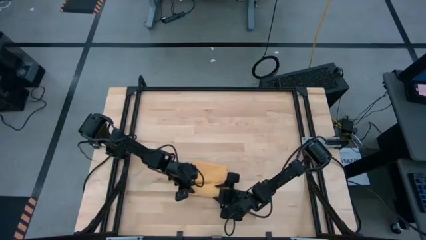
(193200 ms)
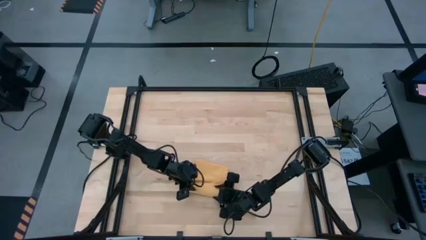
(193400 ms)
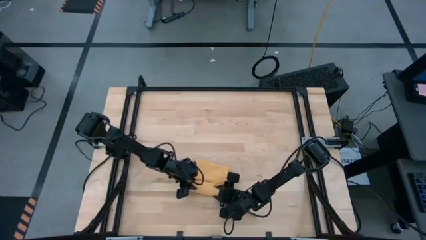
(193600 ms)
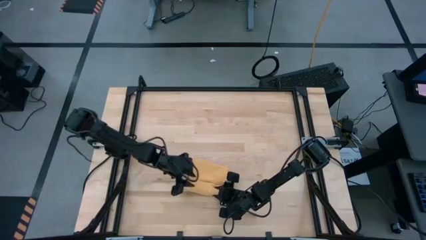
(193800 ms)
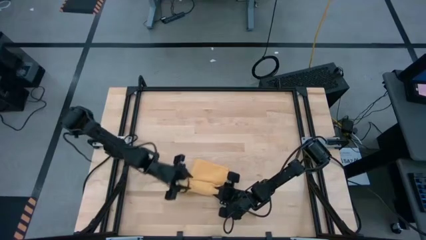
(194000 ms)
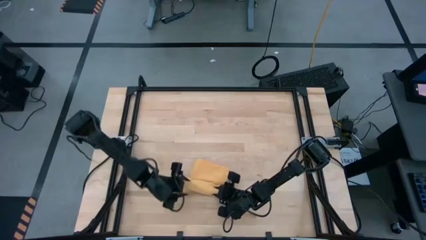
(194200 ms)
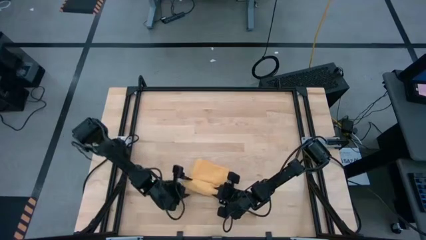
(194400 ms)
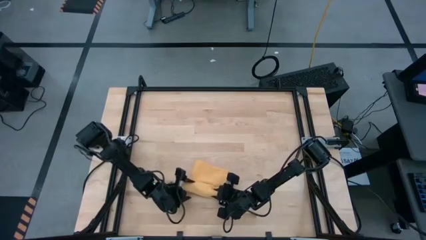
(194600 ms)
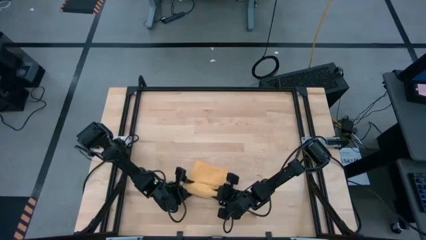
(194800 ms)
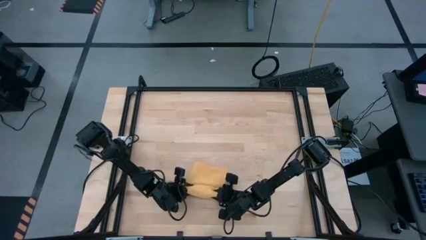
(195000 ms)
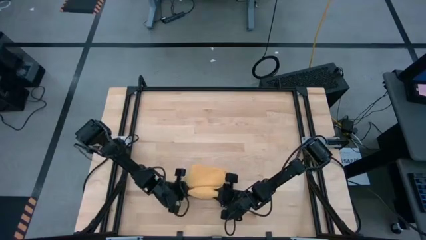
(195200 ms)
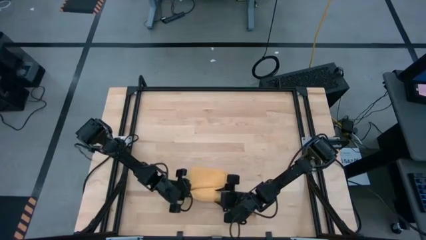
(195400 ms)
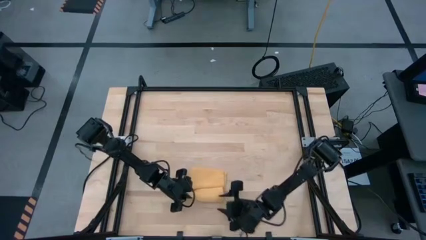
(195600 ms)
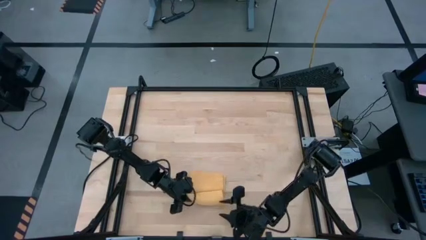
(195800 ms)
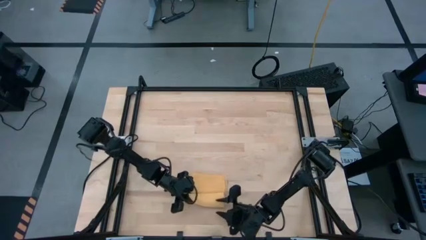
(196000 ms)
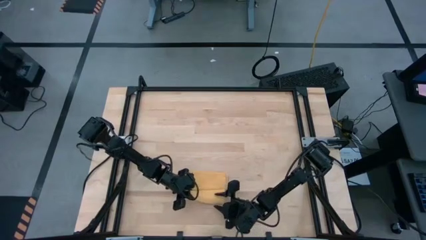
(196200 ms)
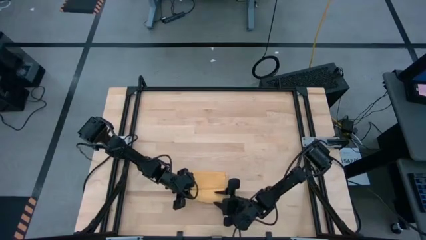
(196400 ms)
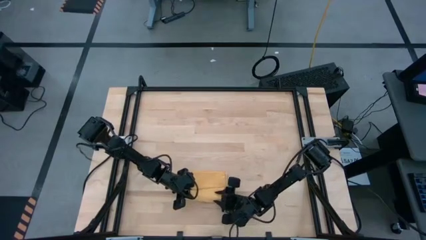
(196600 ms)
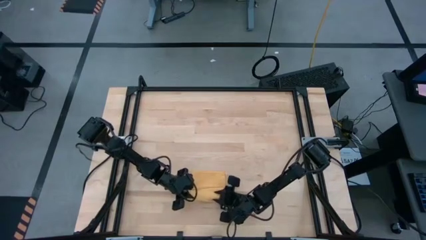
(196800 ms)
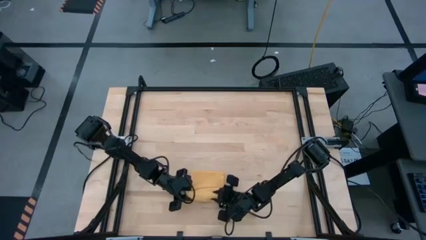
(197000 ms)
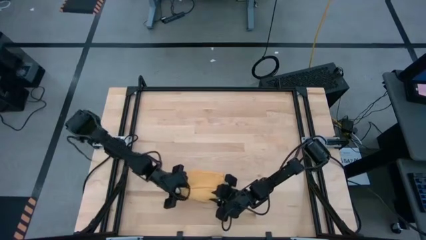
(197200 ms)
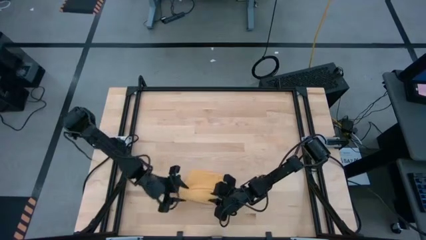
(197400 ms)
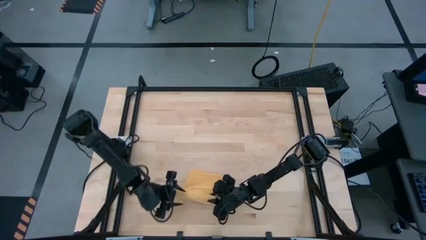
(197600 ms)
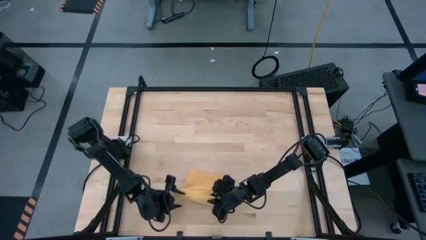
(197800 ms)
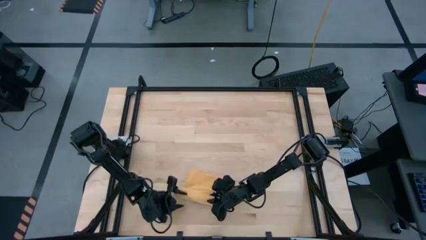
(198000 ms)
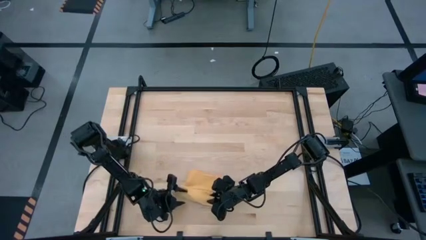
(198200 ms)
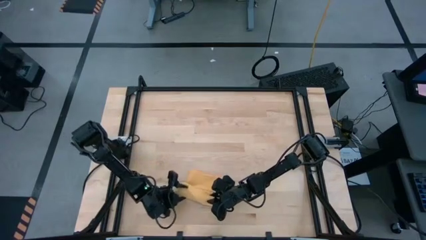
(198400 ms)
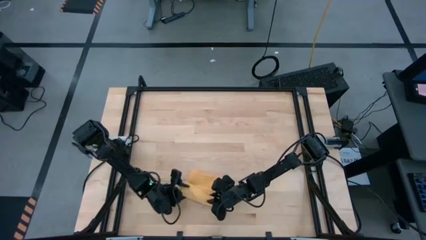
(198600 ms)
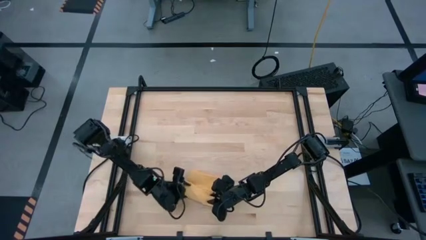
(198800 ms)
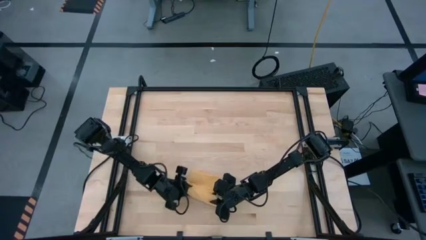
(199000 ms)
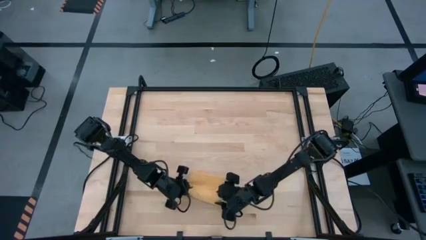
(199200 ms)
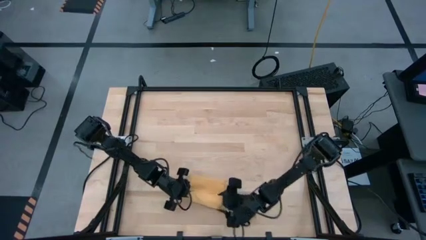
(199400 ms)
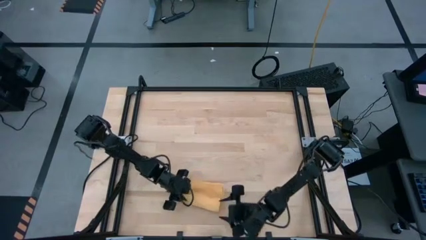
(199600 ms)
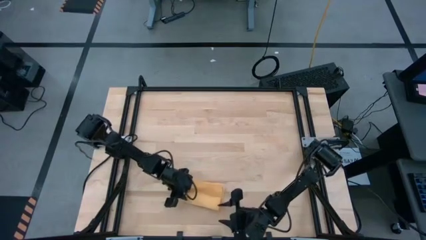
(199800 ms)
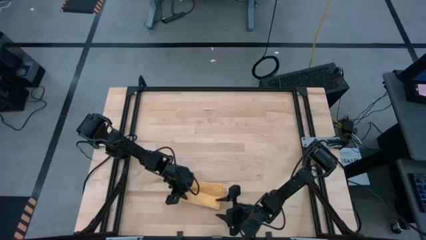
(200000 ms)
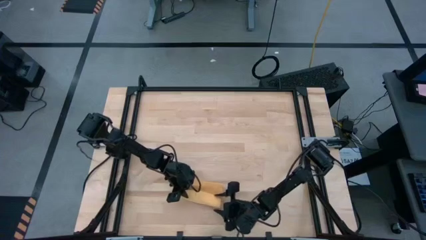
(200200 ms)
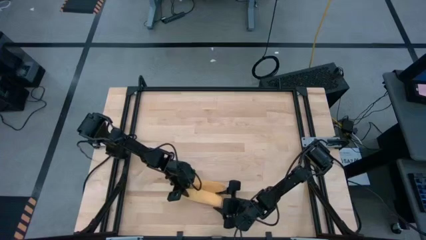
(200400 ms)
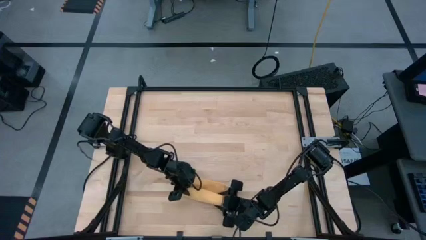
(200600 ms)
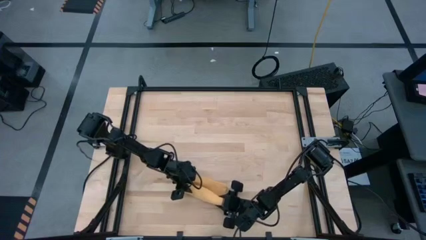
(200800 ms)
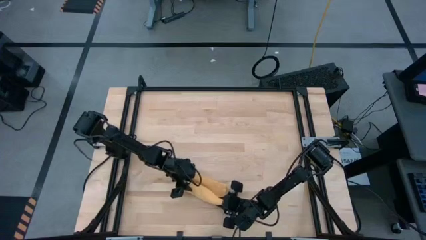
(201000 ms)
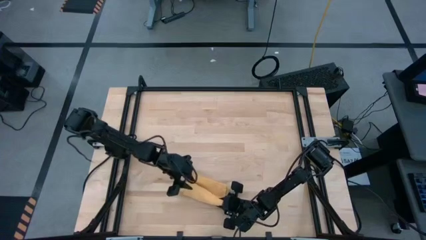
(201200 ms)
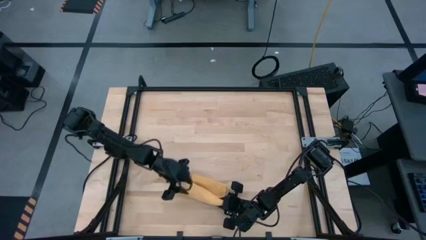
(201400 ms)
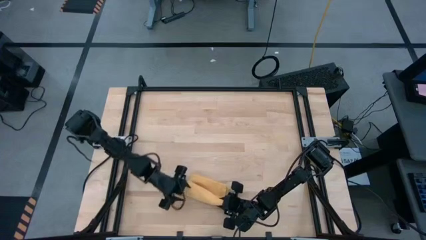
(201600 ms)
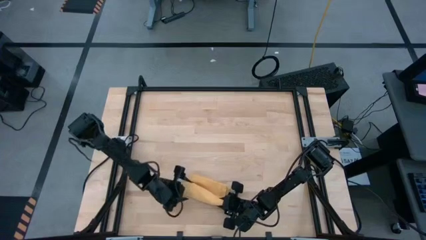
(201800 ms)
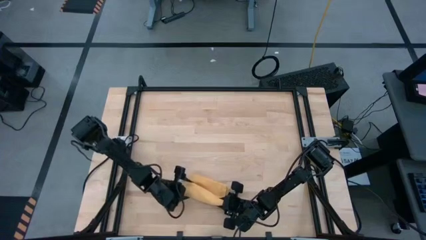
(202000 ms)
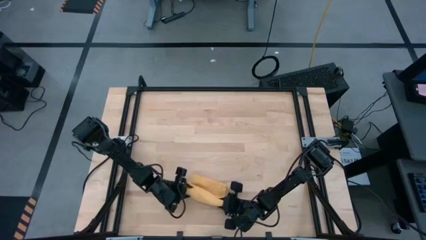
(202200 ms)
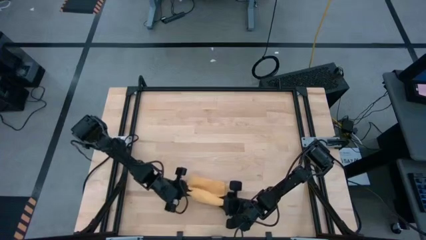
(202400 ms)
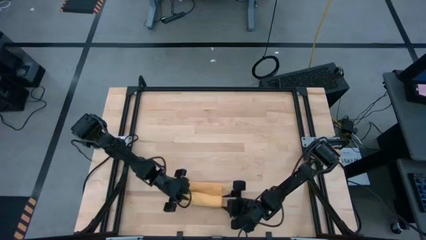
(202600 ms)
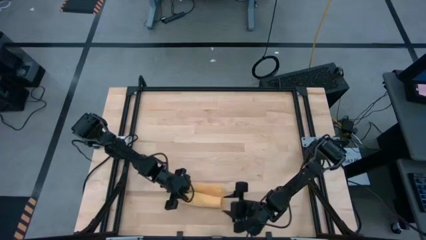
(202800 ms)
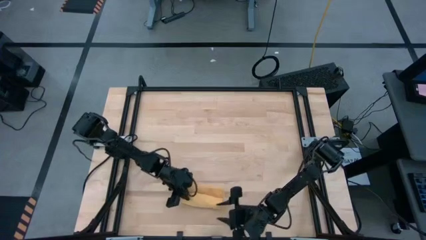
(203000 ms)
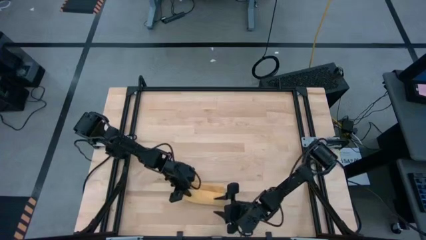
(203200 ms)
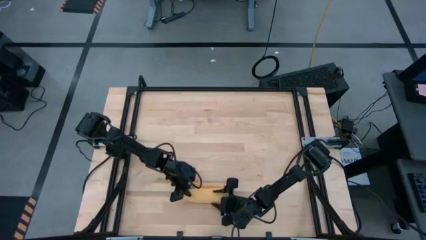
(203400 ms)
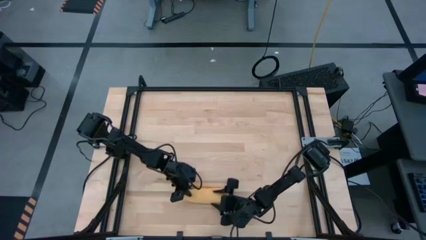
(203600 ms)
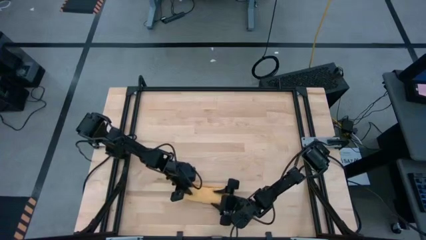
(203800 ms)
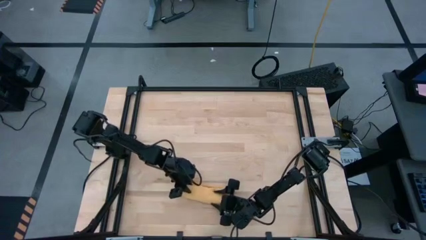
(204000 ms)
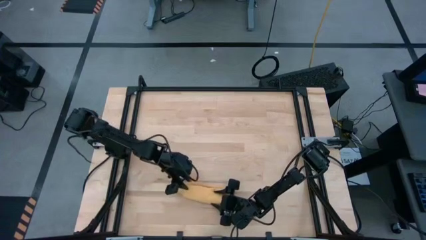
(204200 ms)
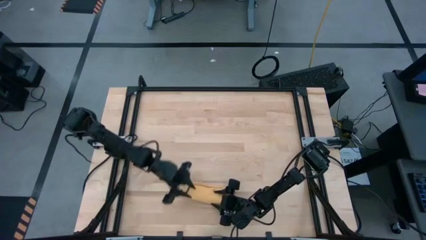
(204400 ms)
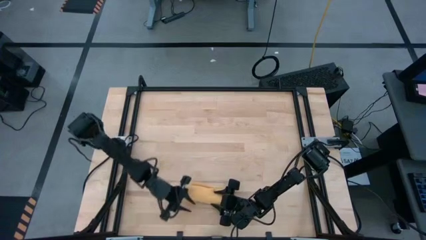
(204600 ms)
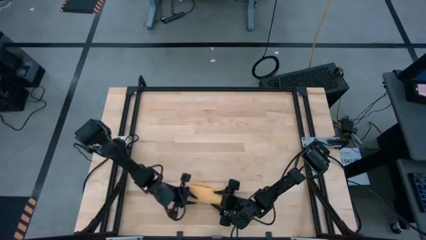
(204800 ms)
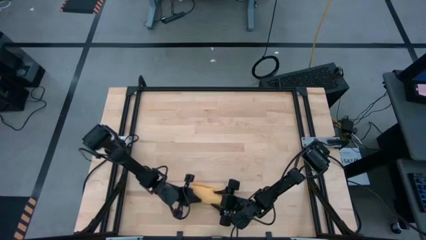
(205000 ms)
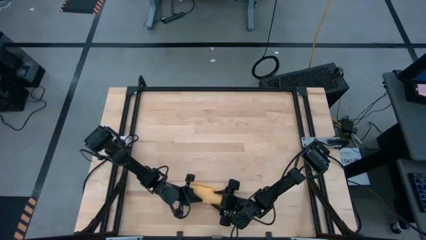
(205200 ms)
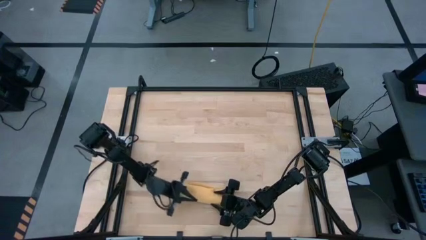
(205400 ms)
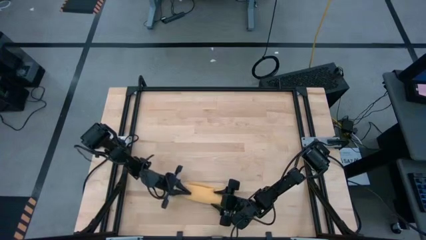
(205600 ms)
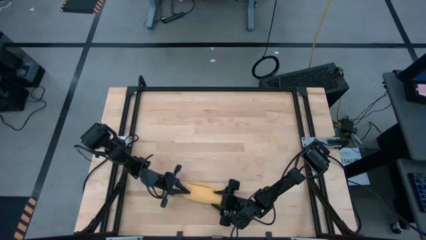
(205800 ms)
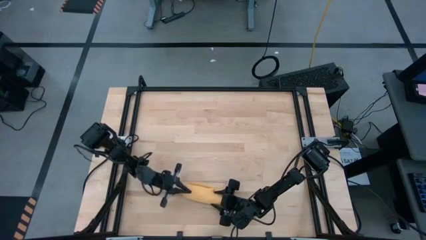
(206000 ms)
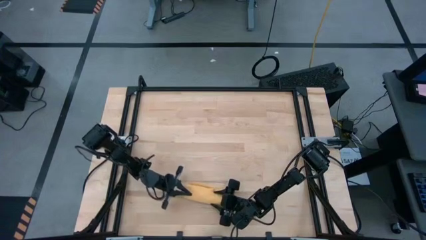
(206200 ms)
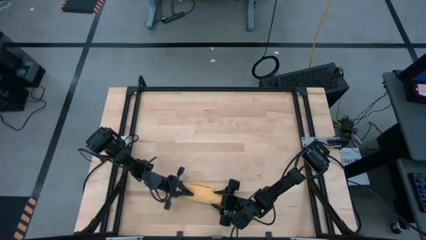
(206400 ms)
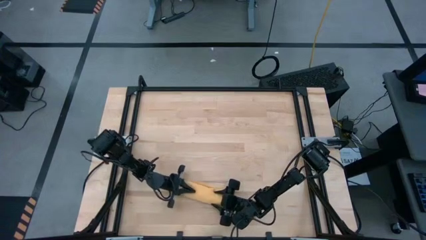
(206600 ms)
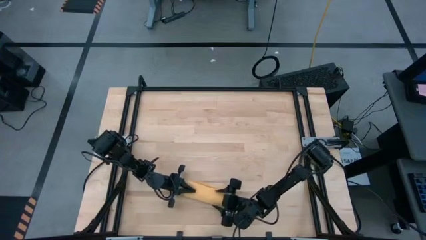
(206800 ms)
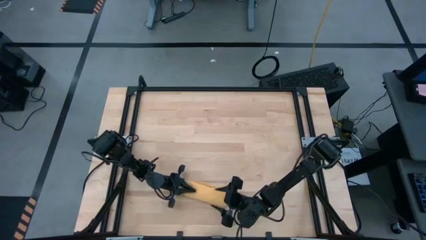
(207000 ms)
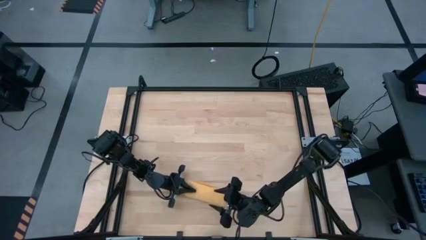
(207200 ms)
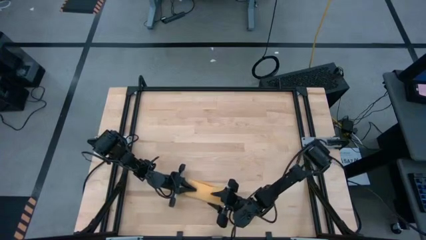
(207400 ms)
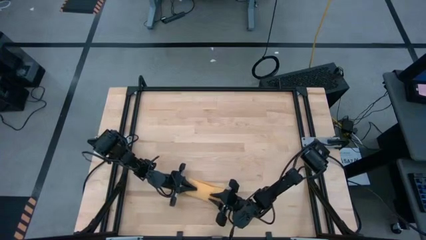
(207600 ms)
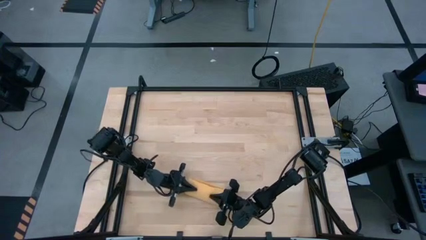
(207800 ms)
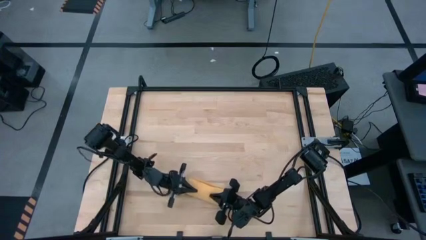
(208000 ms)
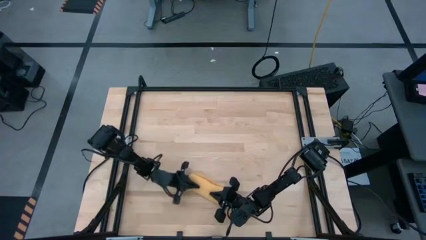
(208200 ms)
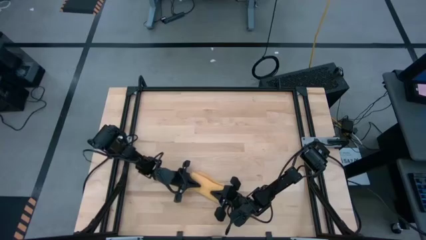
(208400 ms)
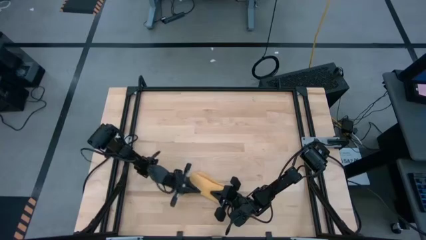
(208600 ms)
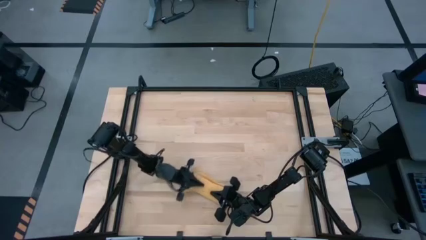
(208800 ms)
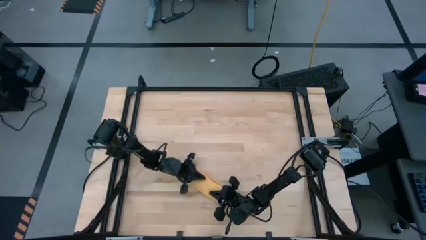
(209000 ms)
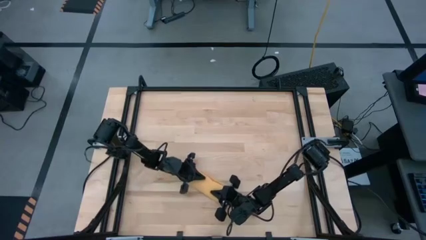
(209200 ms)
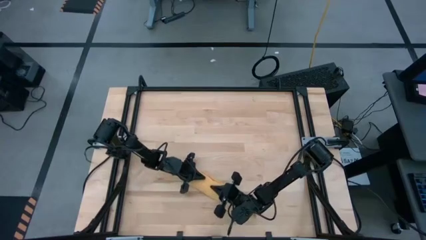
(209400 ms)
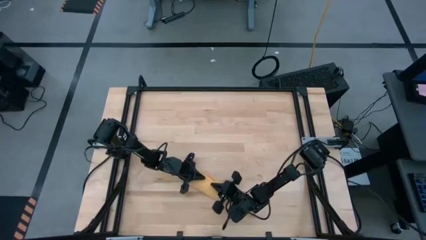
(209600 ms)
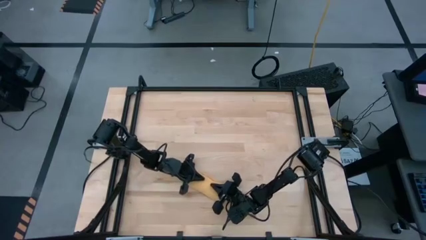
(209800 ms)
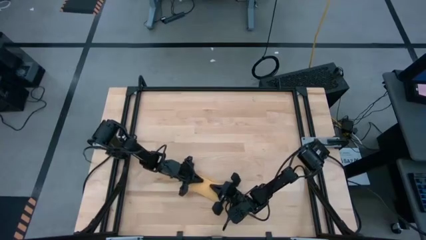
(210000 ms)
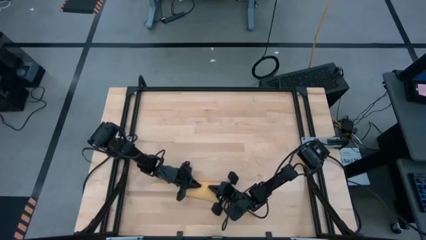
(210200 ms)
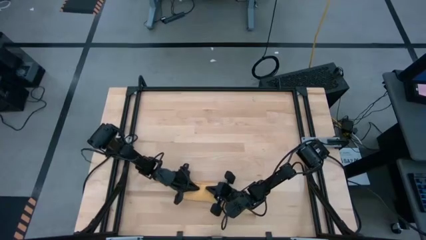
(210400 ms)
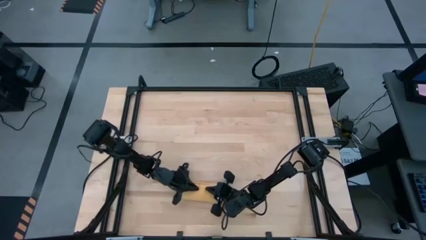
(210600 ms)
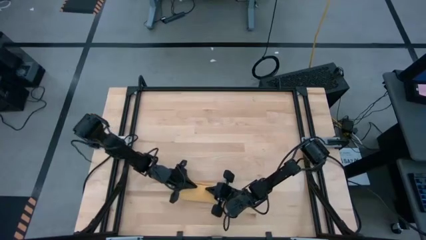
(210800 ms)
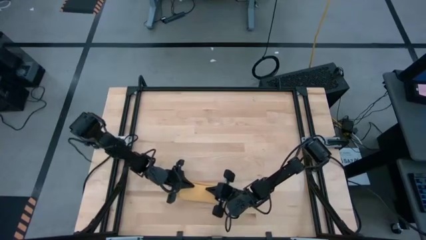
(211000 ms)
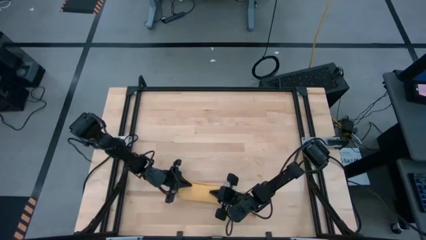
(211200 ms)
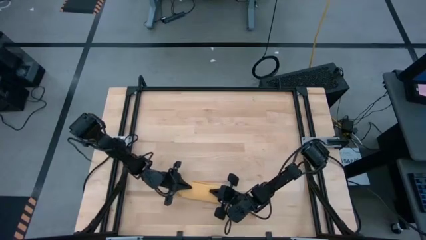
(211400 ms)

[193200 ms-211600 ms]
Task: Roll towel
Roll the yellow towel
